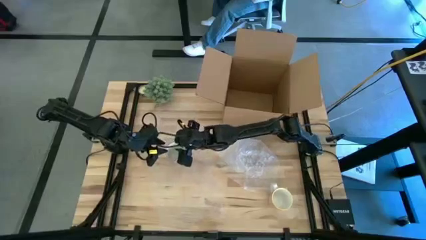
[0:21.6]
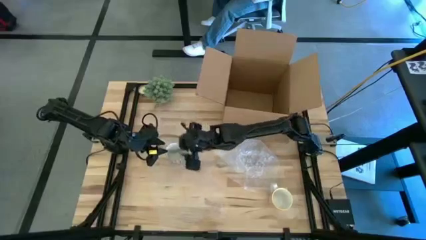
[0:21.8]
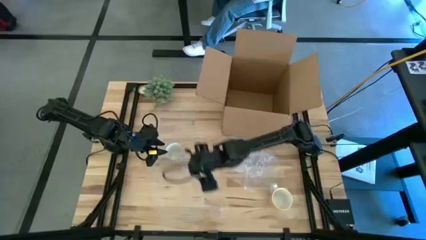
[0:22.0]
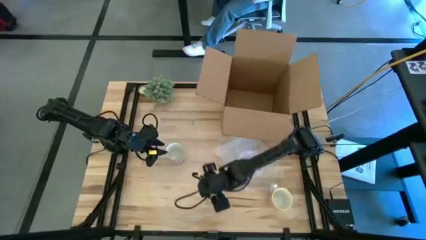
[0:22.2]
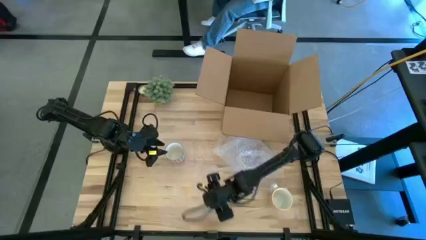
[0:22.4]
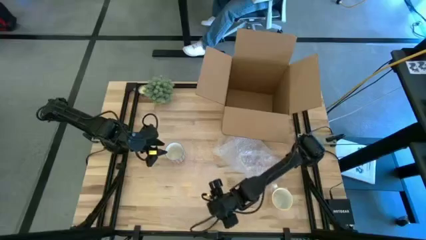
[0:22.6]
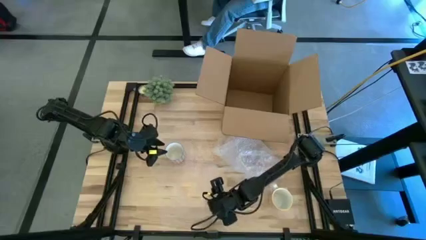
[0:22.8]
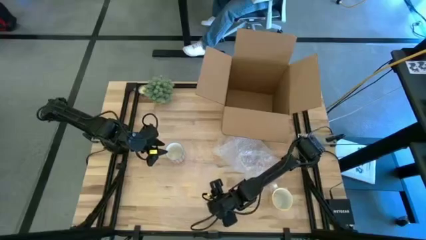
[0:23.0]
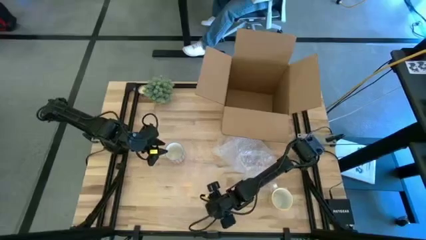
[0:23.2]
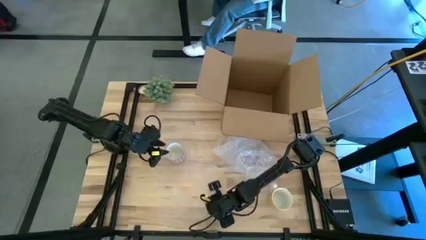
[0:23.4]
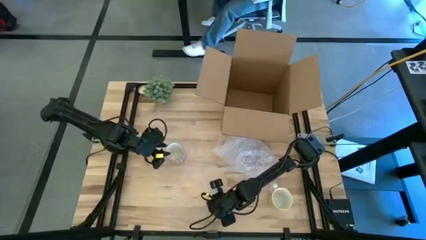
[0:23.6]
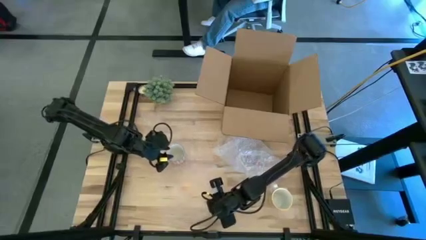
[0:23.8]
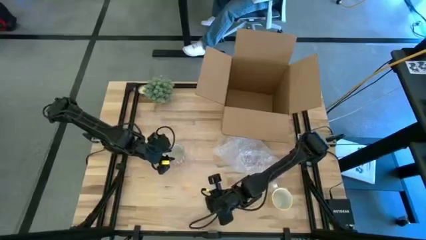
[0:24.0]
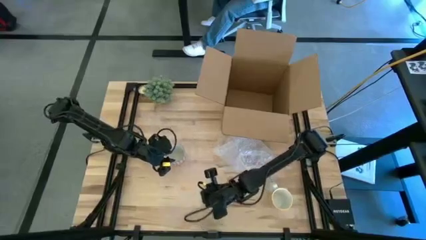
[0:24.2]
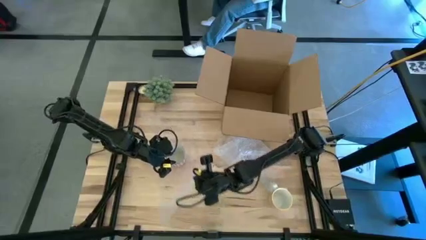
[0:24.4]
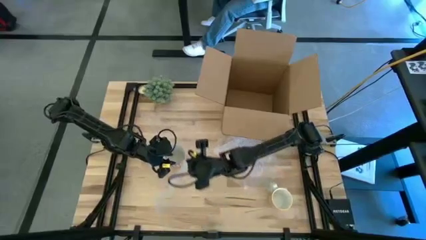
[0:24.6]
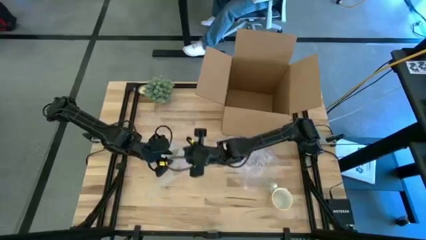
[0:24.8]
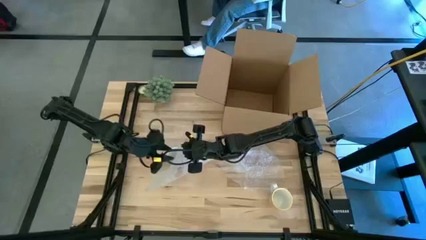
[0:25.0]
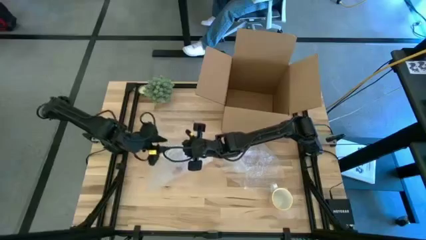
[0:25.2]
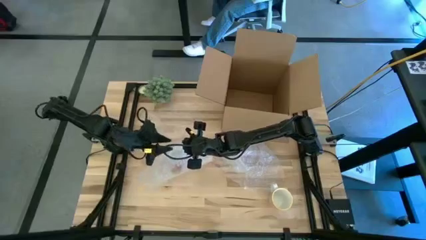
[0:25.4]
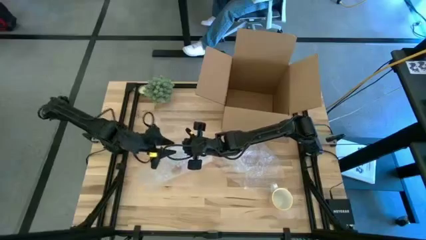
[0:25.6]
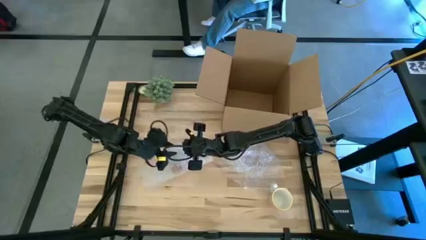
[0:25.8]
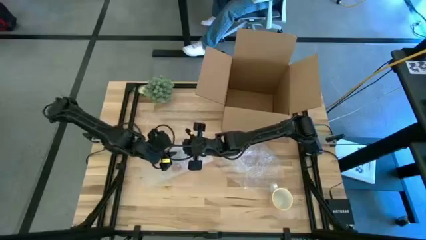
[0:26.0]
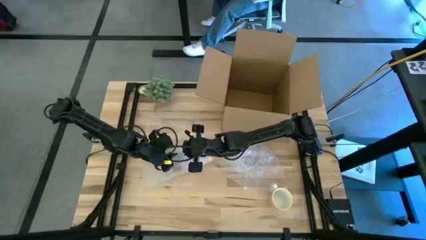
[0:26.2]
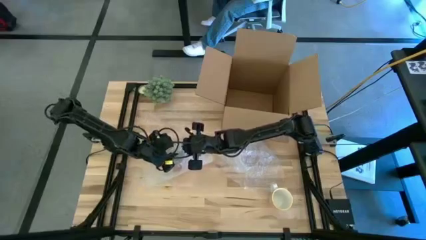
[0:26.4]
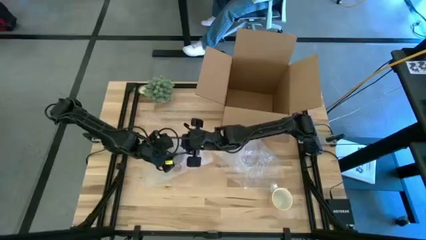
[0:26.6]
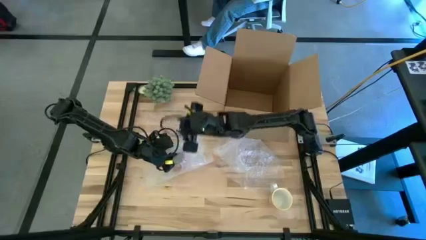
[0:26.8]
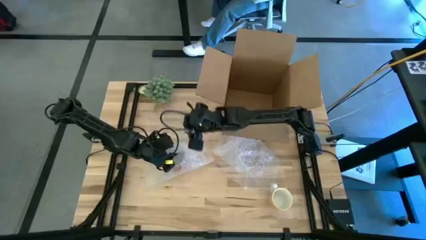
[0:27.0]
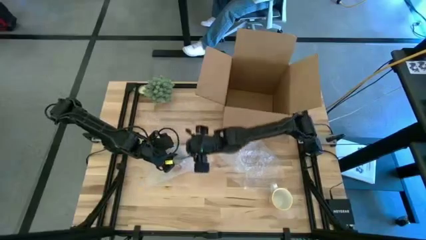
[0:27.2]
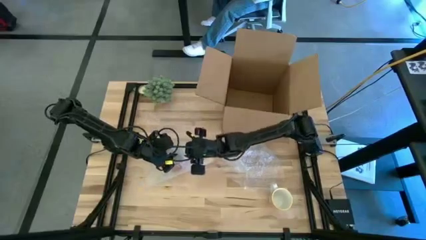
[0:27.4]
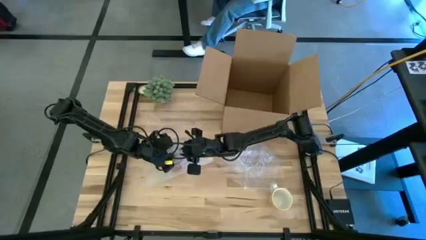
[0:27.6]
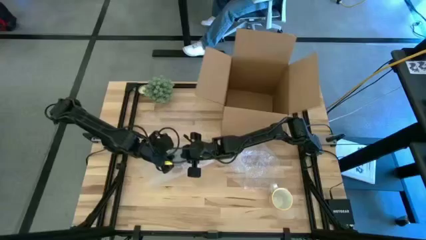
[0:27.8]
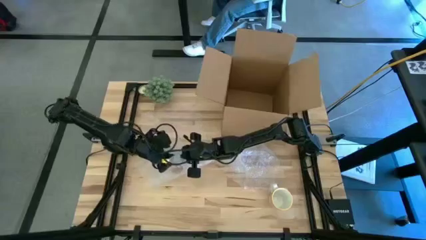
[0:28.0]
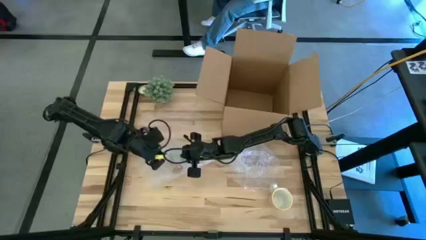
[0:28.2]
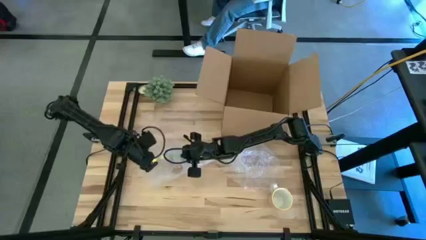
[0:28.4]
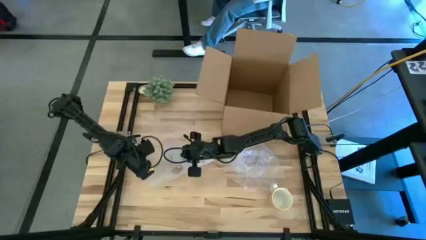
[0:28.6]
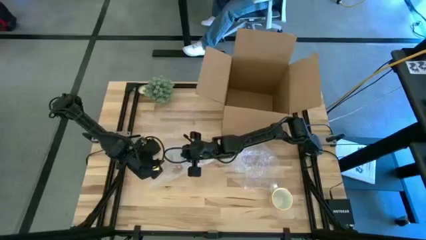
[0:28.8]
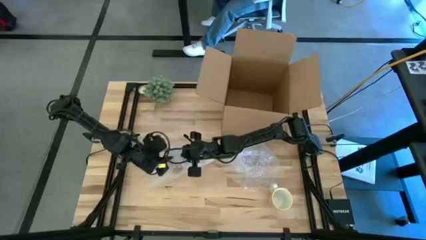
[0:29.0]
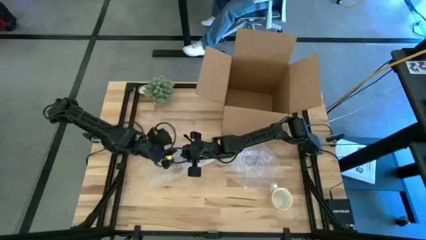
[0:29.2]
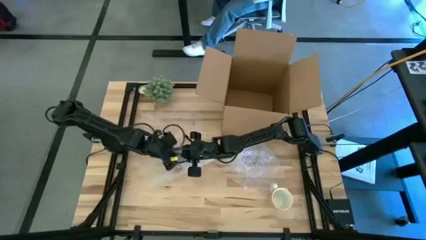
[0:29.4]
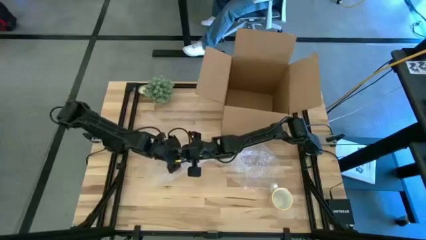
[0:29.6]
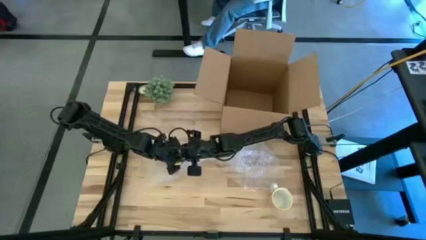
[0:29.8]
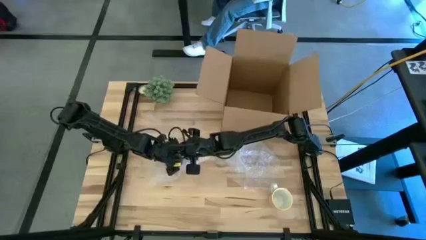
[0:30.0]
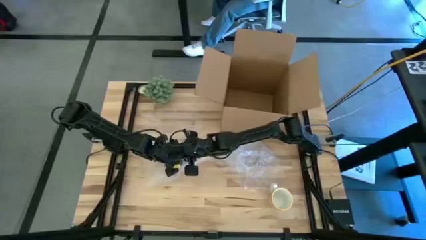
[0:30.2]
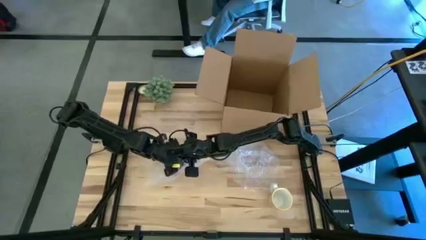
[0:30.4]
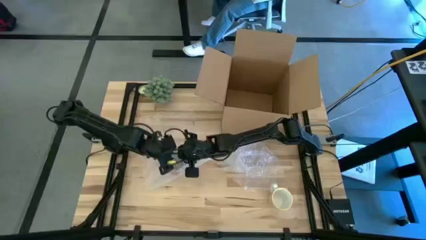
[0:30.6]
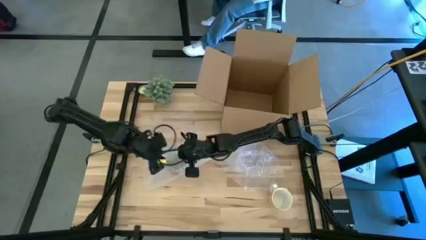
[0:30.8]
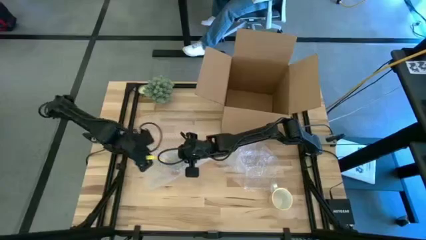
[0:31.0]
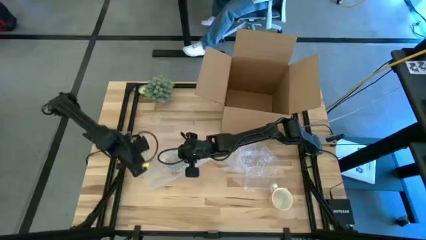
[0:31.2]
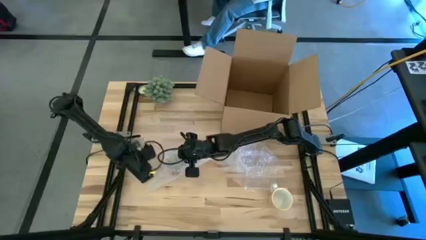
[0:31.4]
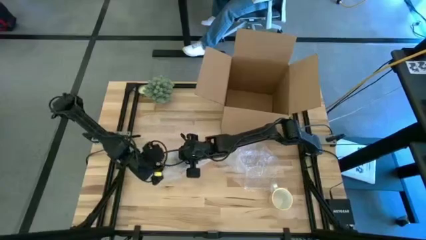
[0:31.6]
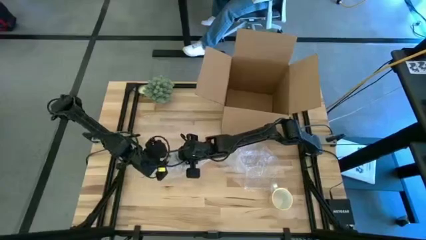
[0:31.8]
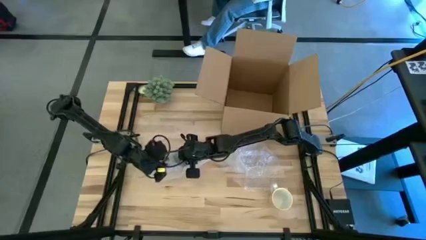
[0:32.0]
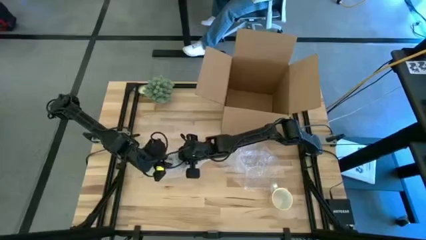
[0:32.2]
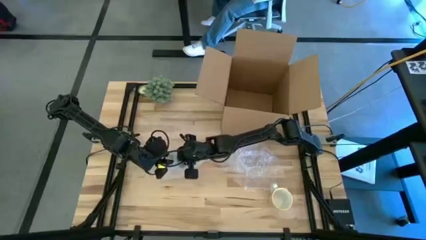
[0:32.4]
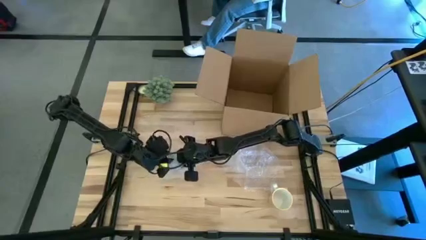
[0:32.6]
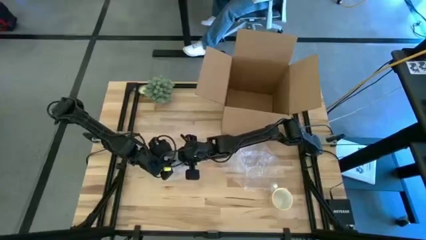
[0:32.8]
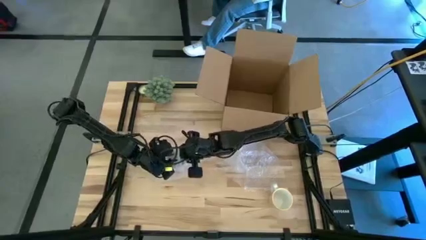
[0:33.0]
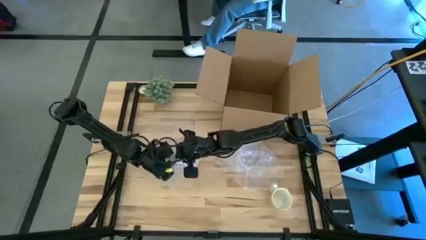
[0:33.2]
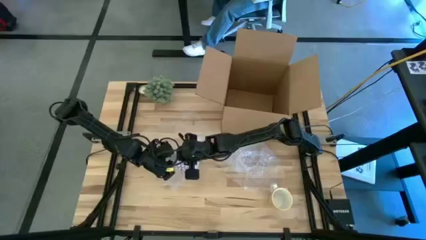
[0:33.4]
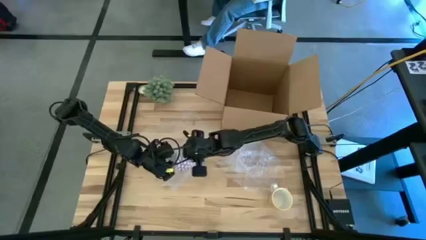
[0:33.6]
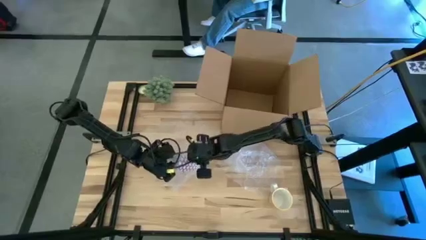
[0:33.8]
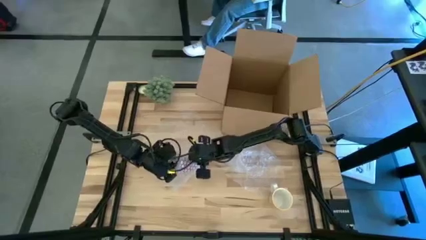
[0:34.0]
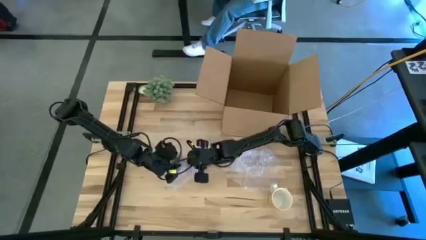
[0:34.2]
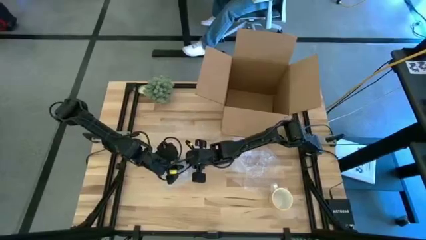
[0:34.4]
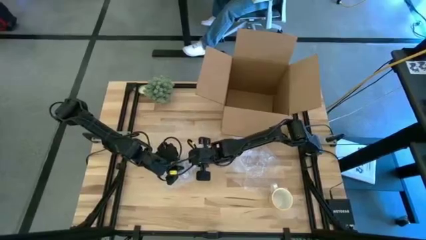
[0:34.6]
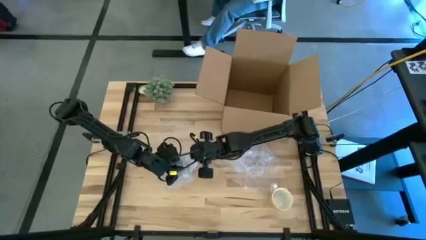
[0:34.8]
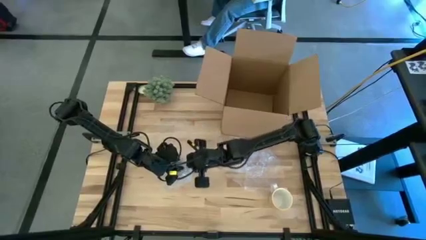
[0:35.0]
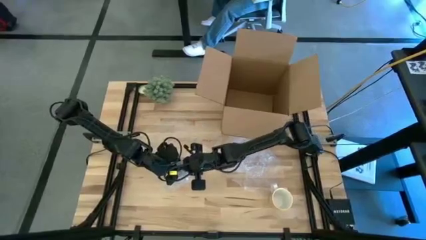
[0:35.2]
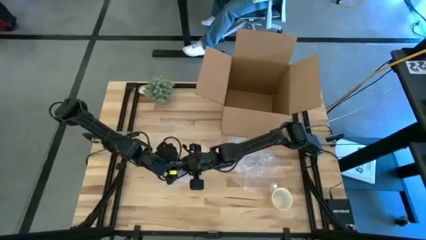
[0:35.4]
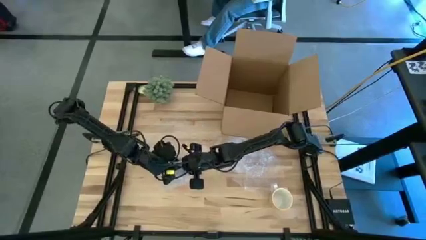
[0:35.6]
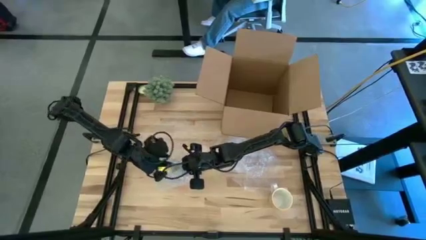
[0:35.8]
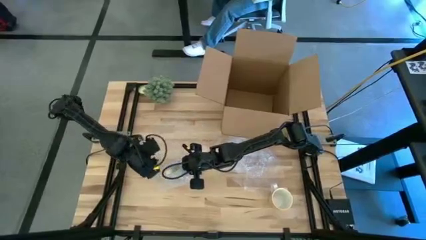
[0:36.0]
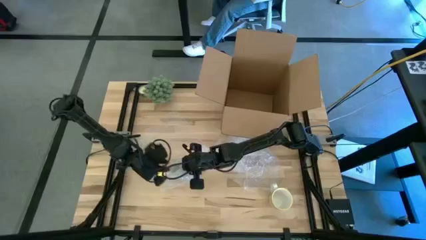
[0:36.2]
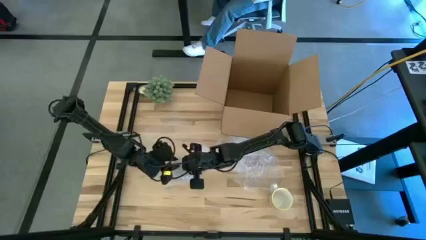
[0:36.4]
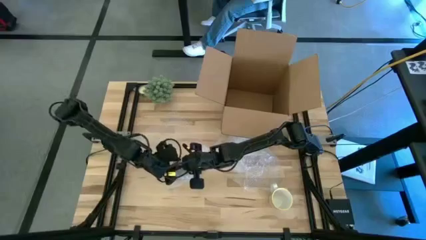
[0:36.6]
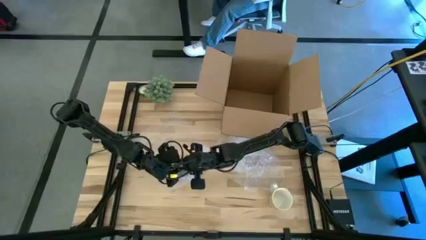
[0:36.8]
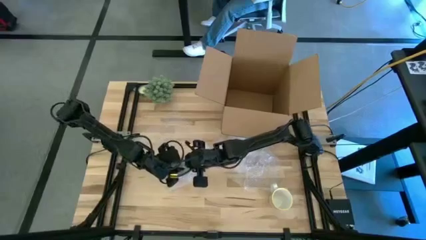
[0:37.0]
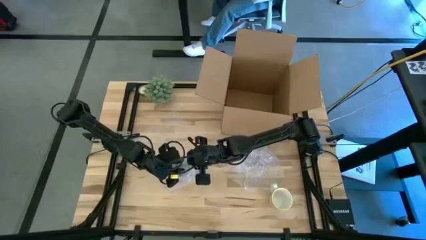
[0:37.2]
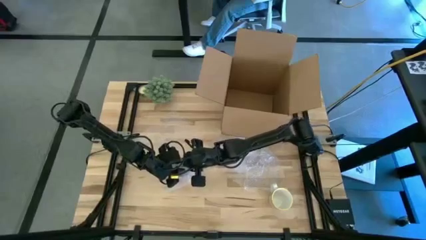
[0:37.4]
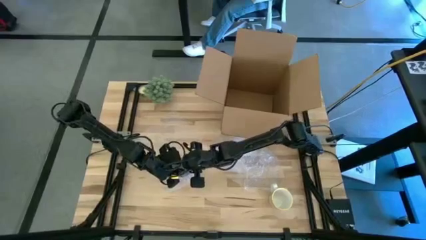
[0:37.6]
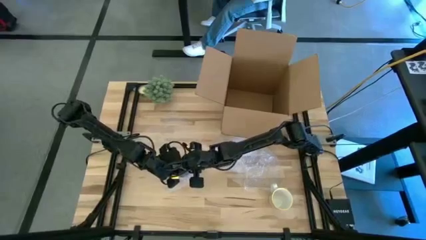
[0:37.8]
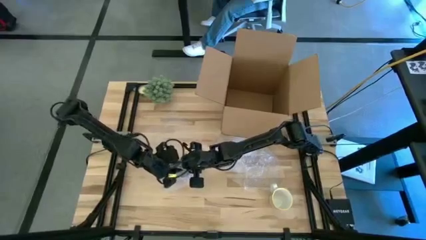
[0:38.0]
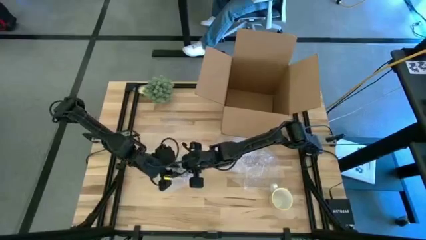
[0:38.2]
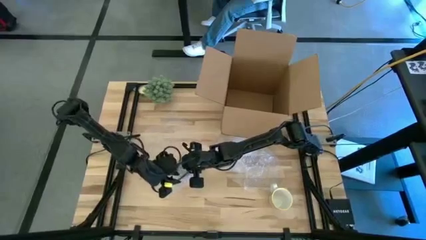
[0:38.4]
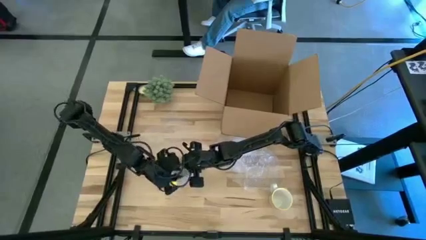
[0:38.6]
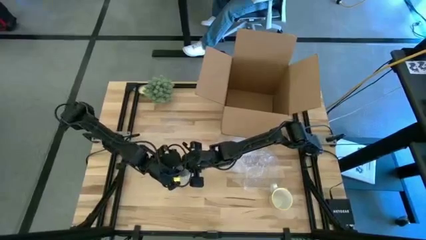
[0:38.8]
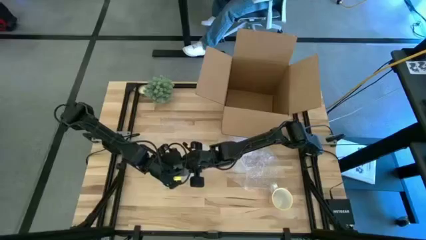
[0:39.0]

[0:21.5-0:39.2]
Task: wrap mug
Wrap the red patterned mug with the bubble wrap
